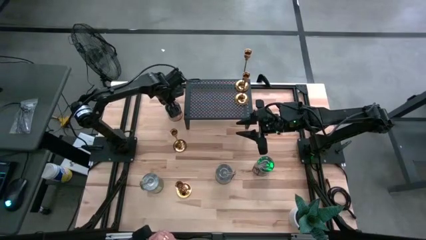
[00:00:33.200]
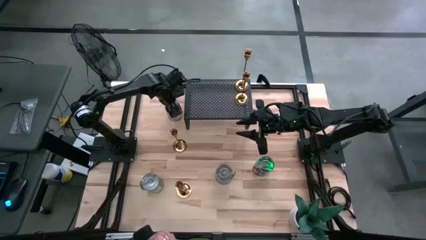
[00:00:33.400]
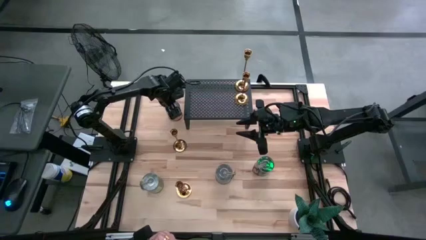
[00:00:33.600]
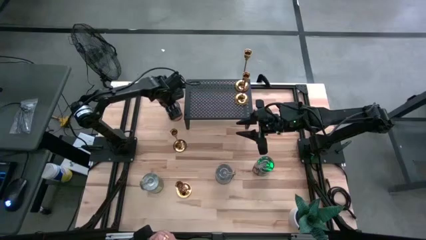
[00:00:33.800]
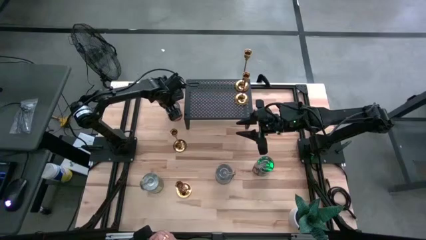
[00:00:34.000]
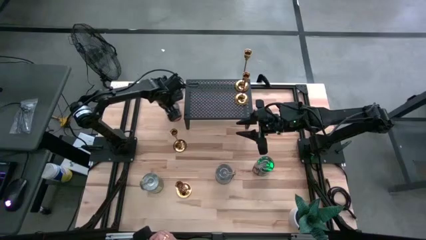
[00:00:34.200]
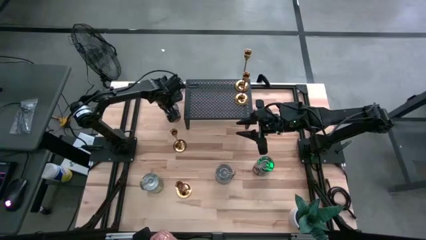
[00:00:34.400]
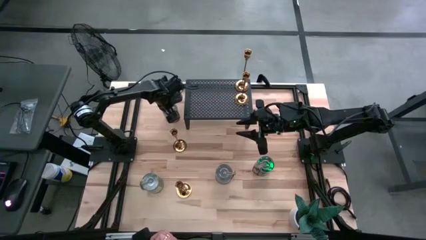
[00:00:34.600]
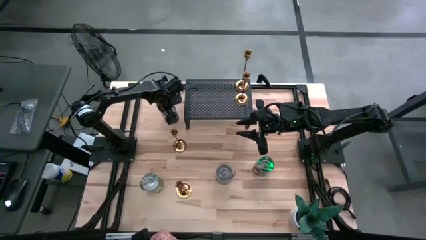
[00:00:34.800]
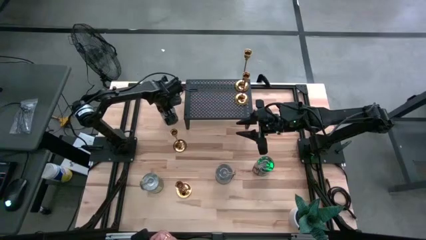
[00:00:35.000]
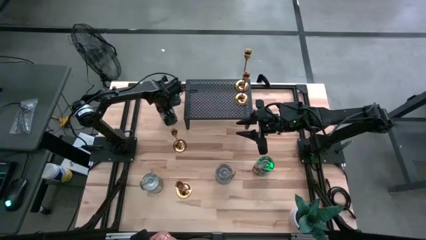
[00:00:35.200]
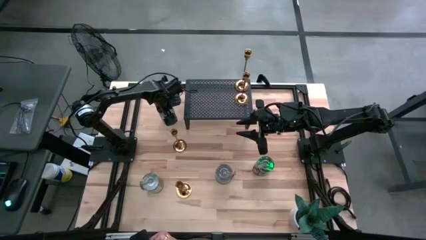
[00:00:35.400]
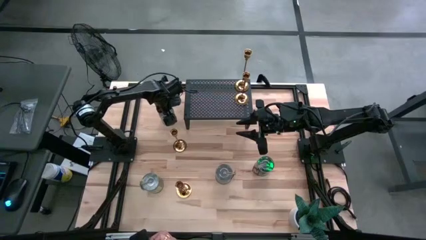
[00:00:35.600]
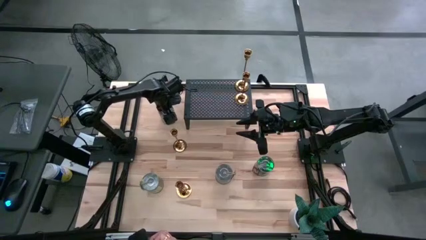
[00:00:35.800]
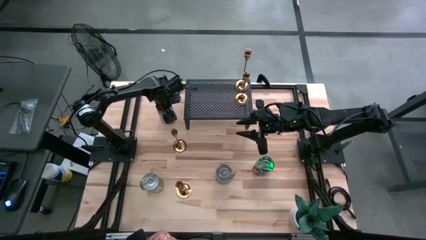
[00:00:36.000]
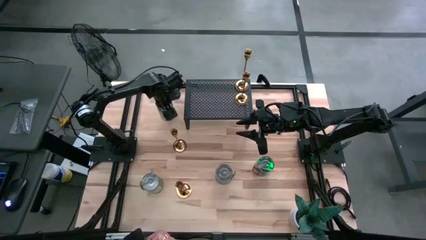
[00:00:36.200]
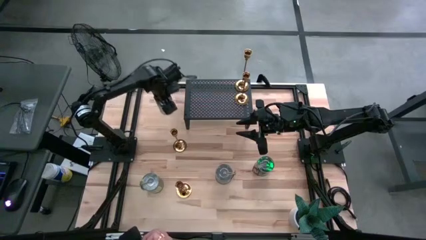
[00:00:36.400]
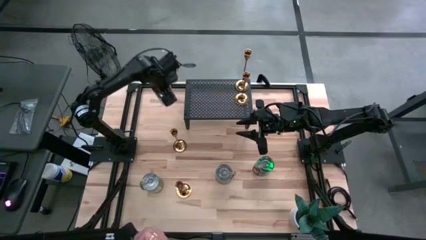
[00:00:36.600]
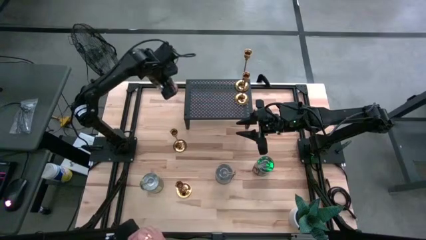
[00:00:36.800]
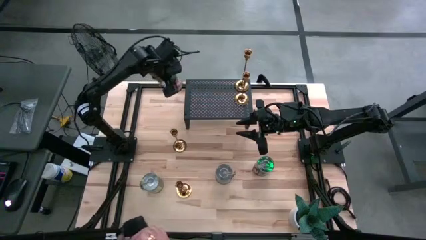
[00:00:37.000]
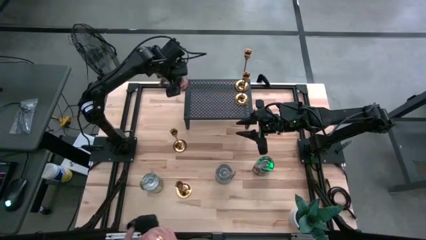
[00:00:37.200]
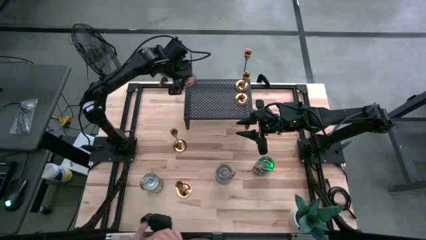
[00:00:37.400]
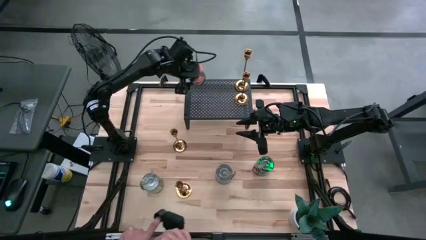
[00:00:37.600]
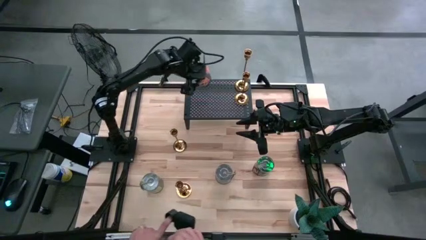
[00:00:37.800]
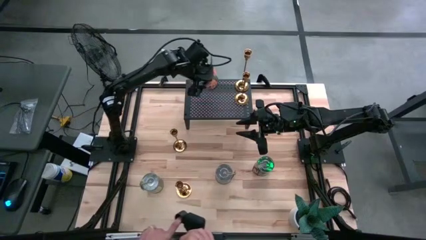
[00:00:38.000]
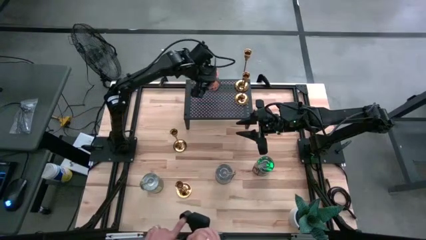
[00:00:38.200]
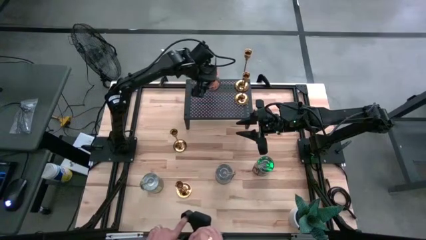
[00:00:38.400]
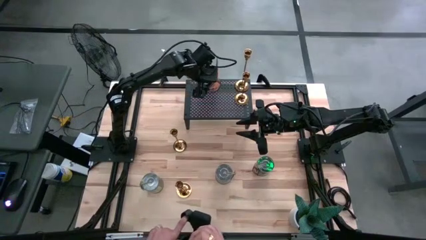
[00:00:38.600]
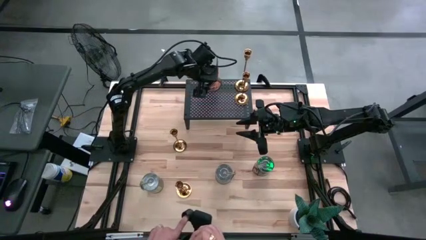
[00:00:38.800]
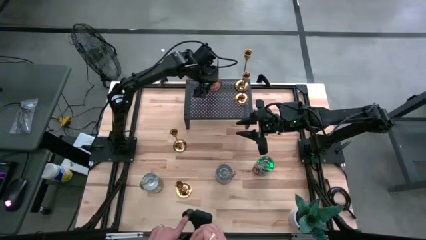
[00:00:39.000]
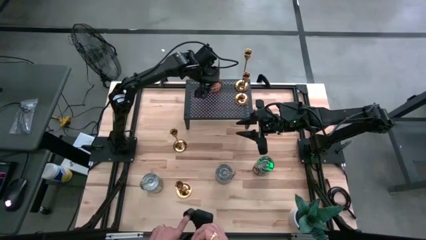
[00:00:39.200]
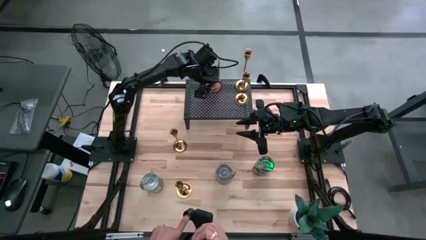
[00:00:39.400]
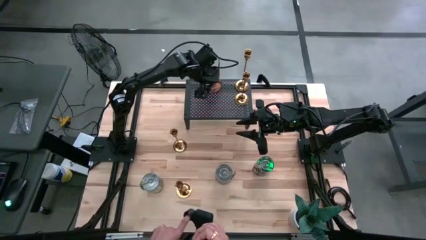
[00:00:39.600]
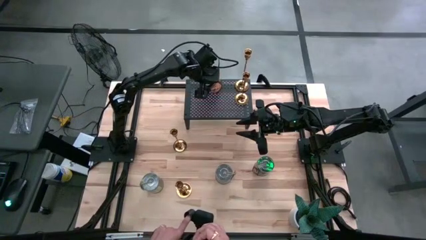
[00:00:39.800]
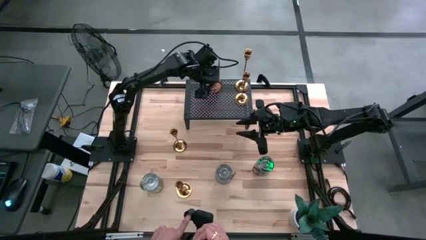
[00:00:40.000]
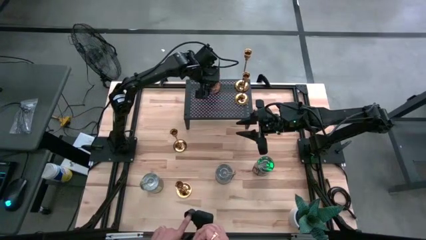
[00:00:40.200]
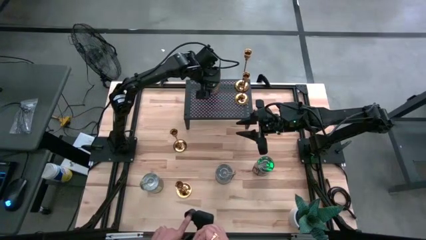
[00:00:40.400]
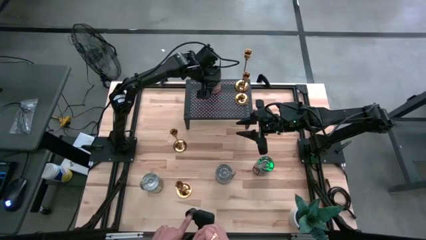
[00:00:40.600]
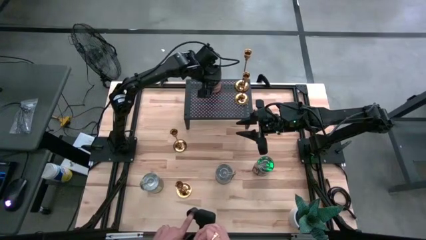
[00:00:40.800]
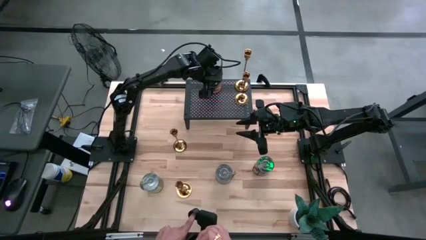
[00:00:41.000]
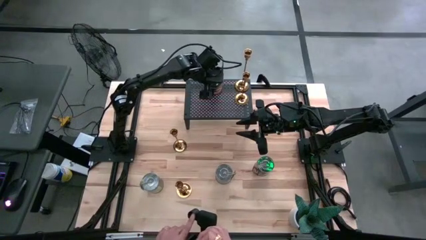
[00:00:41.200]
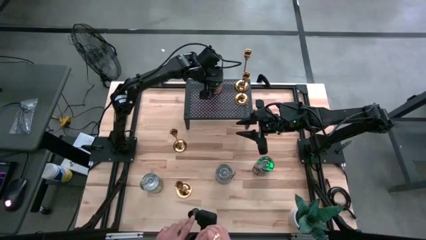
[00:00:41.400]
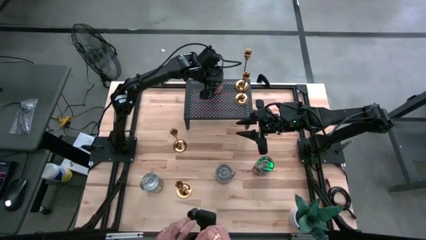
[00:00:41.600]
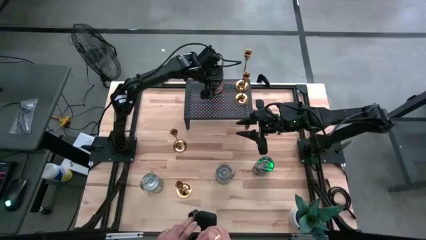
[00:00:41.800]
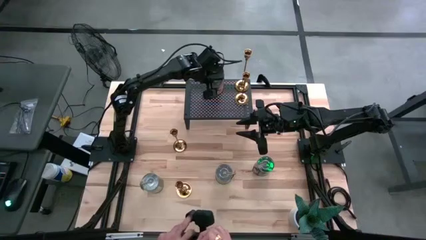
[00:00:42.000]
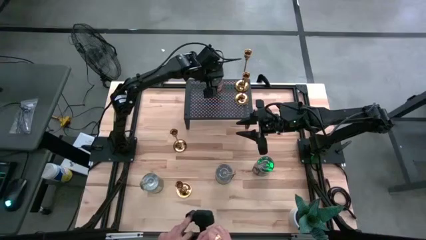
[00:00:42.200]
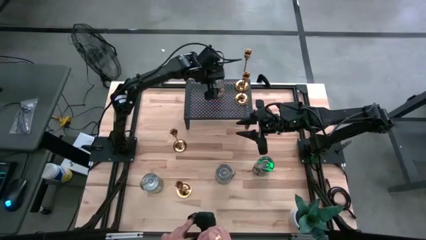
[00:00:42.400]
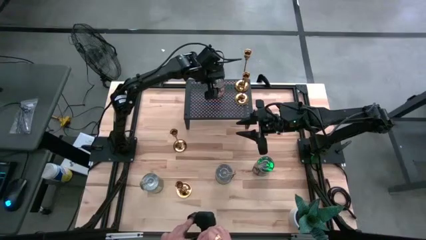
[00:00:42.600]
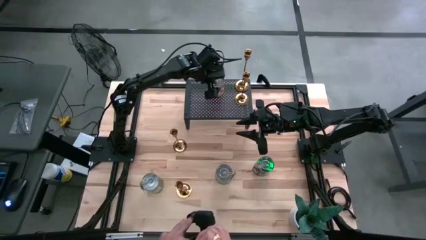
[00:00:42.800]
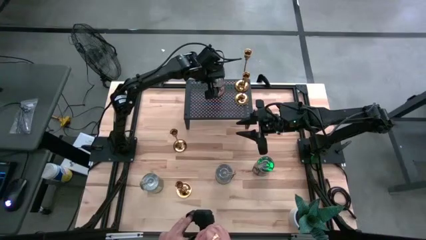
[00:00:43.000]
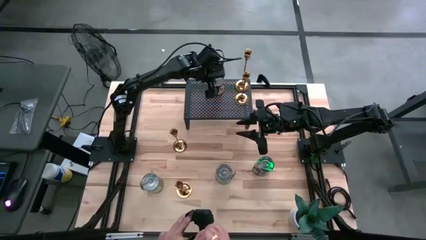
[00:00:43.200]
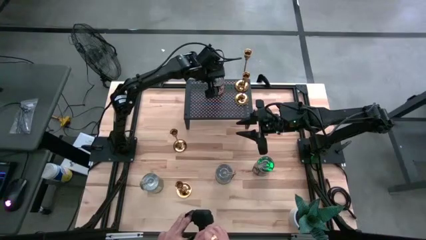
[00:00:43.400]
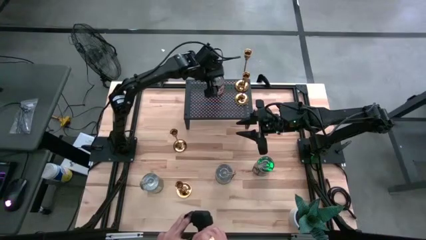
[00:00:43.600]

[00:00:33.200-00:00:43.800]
Task: Pick & Place candle stick holders
Put the orange scented candle on the shelf

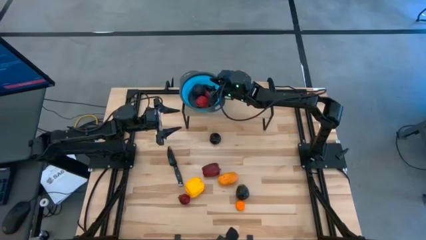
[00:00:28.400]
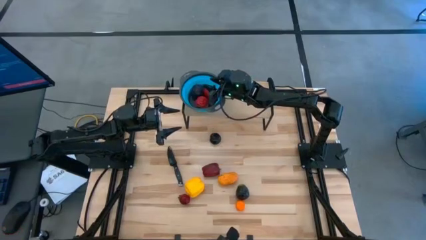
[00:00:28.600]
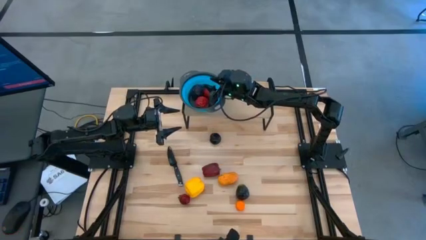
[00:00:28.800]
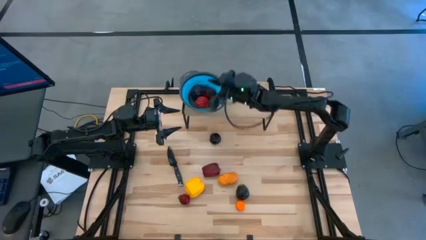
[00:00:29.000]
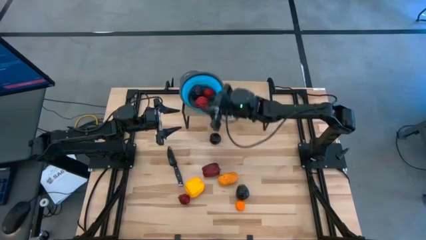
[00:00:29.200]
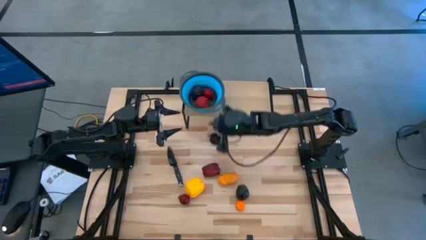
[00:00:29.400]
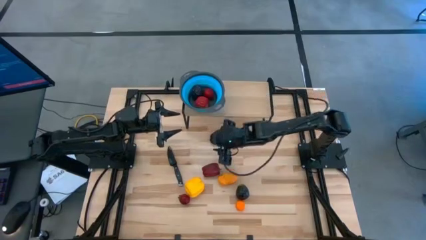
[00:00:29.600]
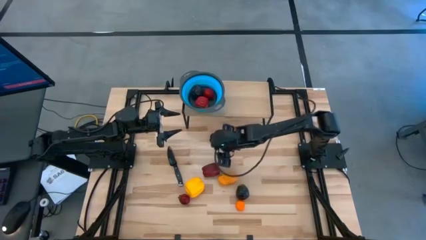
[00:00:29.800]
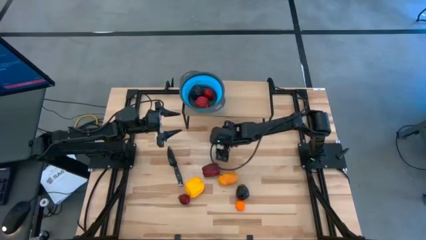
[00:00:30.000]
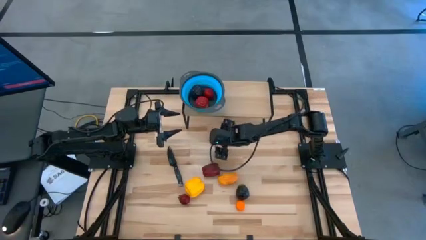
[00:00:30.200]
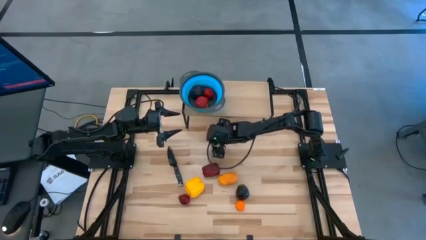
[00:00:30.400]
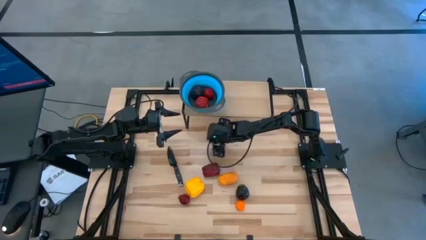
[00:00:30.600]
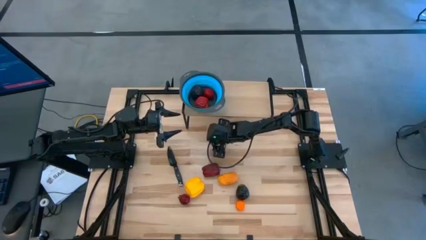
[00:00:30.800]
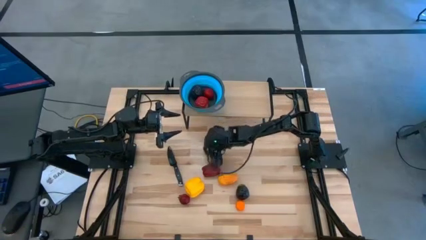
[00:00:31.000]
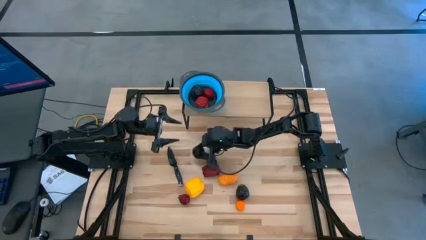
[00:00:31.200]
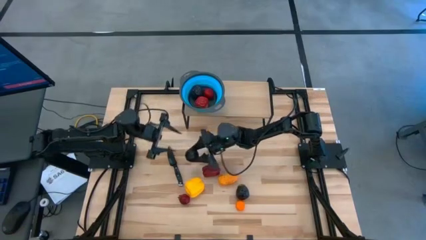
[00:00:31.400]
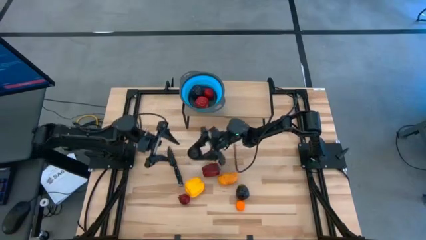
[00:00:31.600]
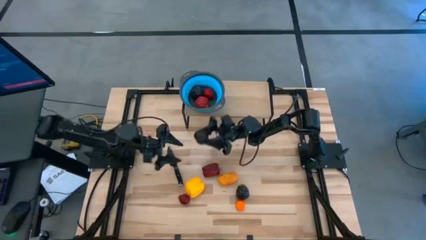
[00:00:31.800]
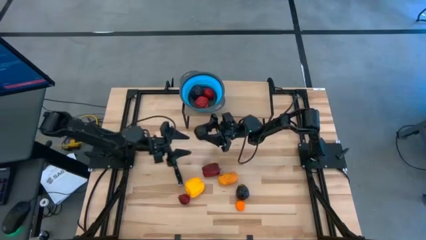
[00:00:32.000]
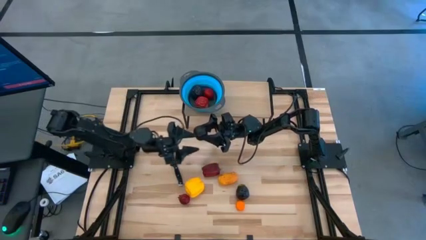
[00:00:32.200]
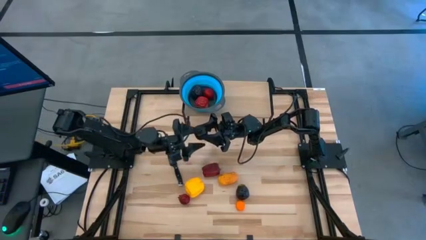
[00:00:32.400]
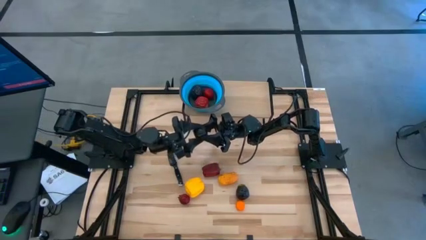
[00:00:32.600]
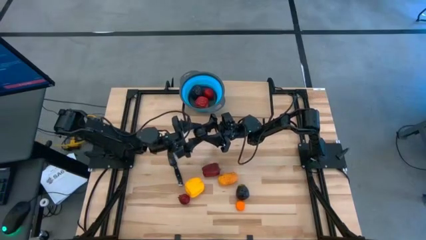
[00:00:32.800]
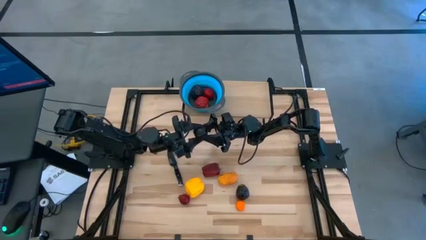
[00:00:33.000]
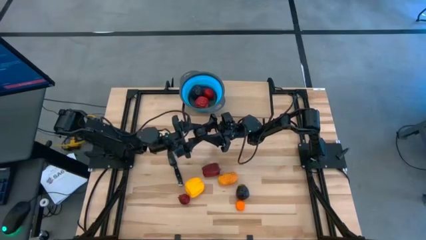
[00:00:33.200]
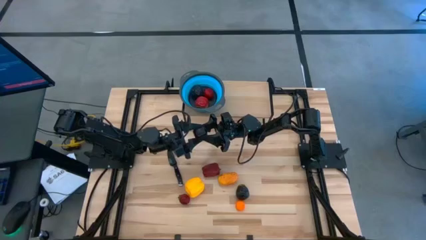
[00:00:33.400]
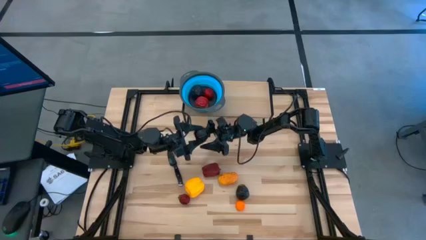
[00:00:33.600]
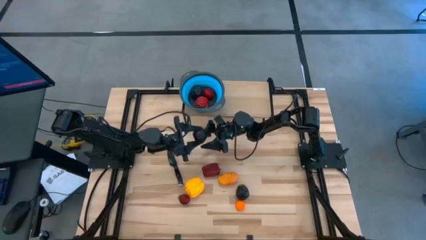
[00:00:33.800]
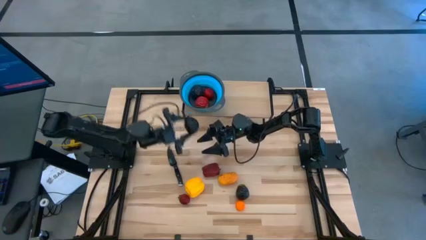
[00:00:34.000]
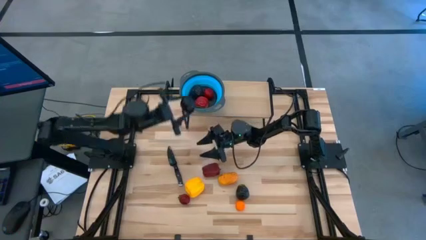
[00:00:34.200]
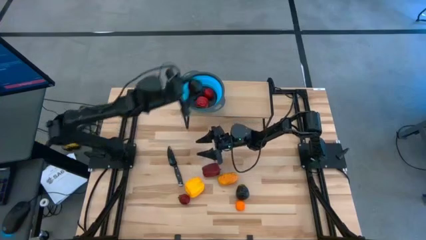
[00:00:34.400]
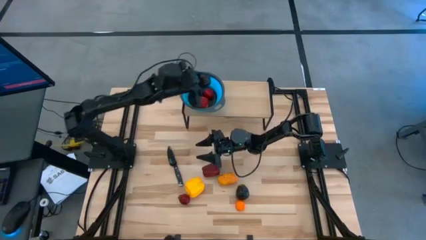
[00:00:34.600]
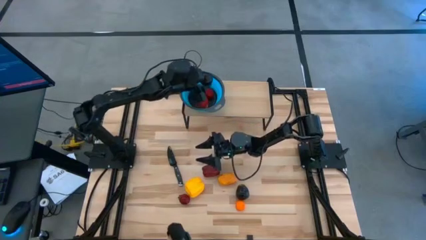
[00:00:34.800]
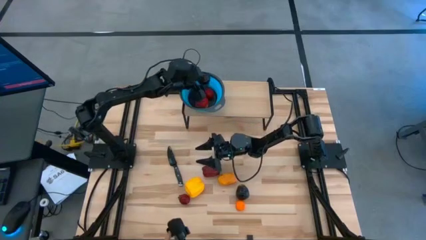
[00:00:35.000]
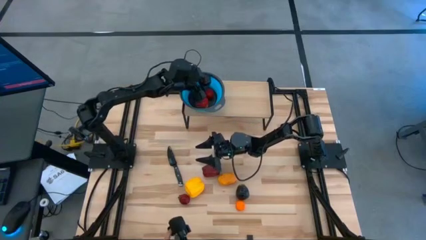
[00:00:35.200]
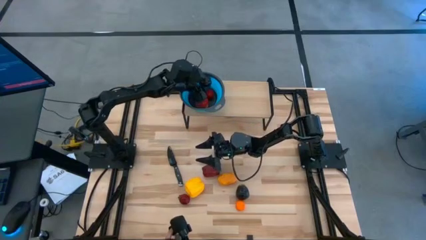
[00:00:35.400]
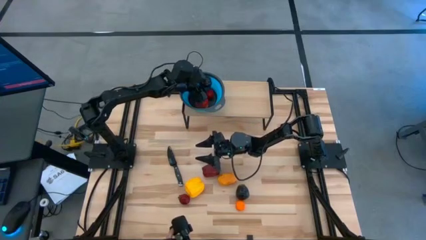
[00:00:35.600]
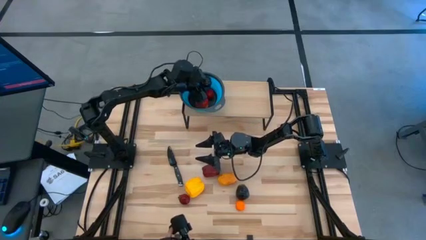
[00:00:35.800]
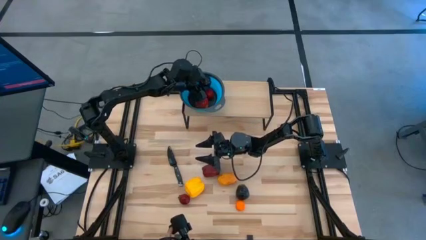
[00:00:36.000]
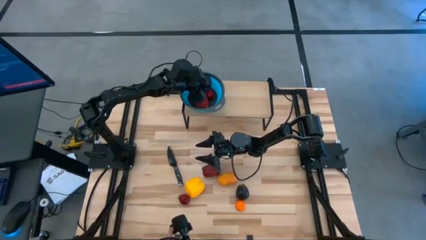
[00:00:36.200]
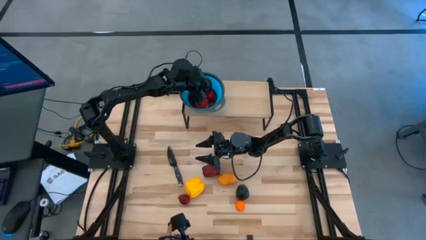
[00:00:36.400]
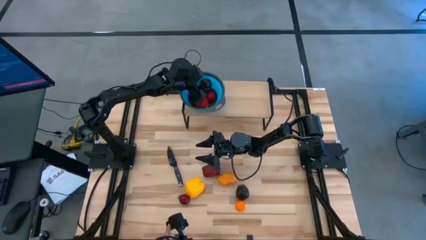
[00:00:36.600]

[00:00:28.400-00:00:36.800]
Task: Pick & Place Fruit
Put the plum into the blue strainer bowl on the shelf
